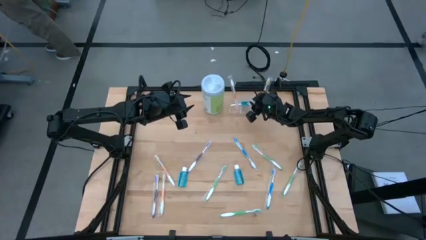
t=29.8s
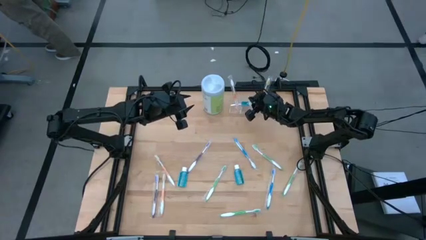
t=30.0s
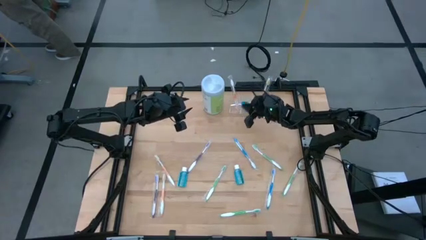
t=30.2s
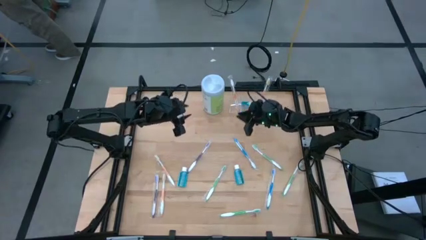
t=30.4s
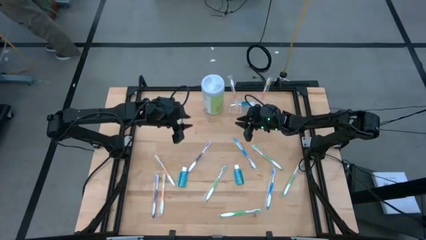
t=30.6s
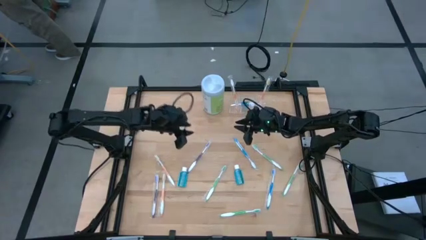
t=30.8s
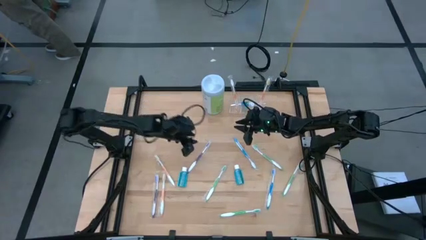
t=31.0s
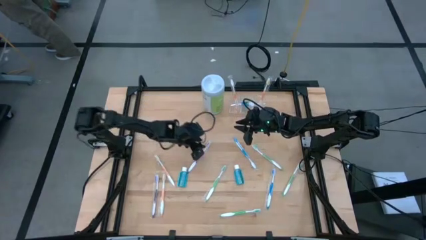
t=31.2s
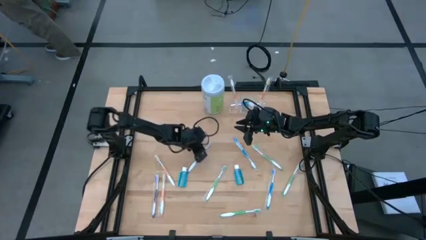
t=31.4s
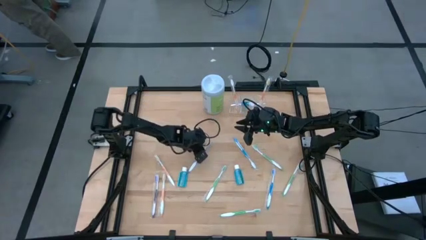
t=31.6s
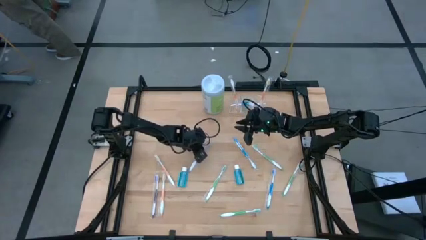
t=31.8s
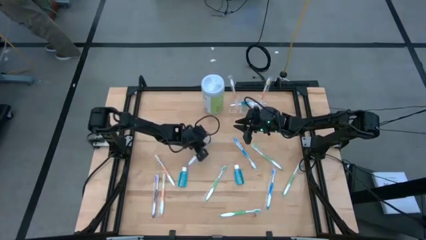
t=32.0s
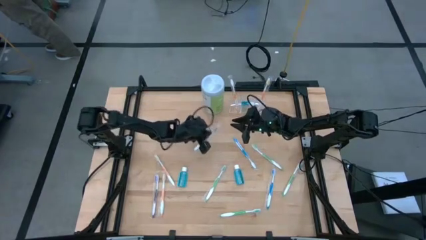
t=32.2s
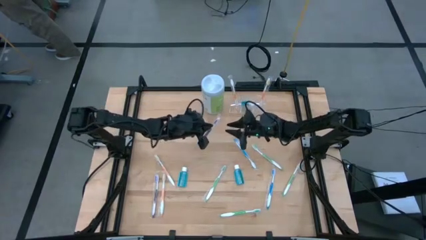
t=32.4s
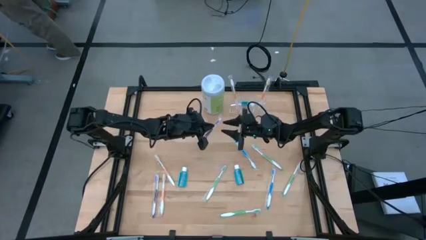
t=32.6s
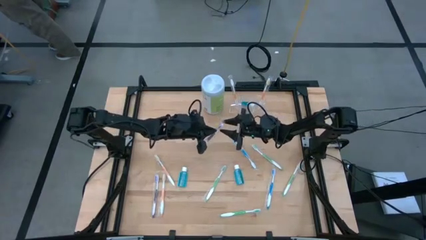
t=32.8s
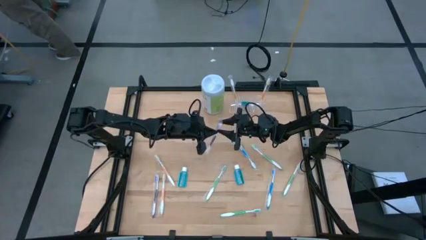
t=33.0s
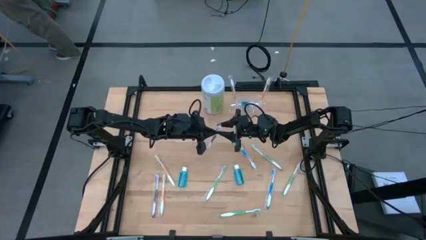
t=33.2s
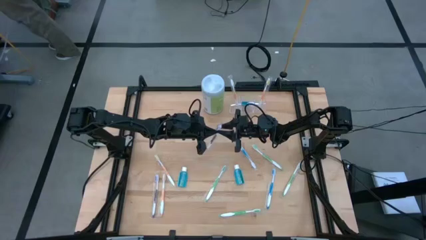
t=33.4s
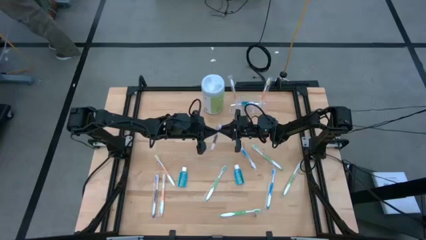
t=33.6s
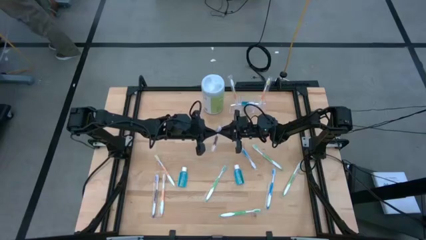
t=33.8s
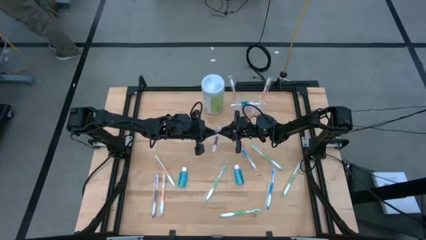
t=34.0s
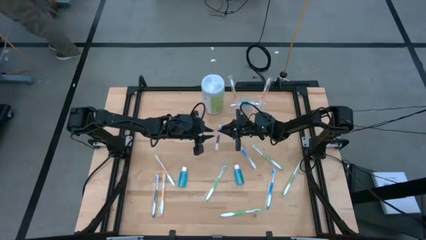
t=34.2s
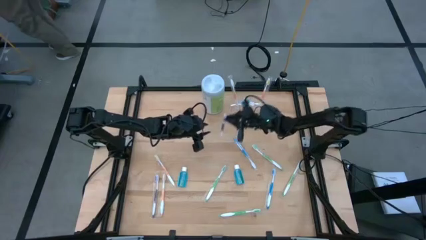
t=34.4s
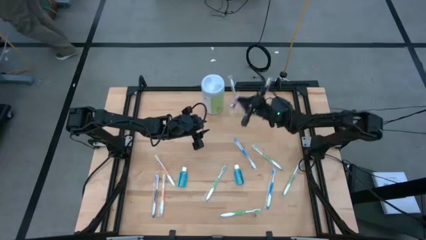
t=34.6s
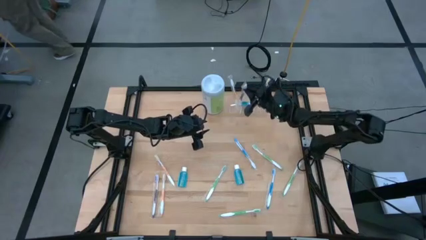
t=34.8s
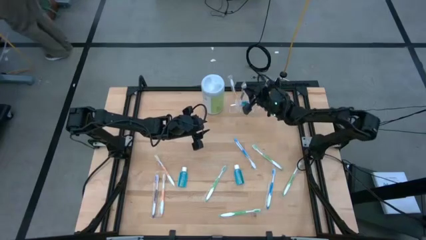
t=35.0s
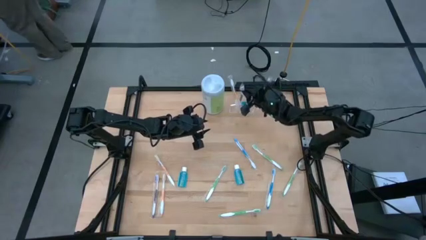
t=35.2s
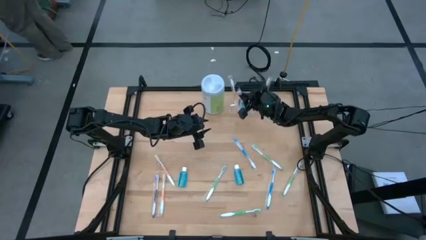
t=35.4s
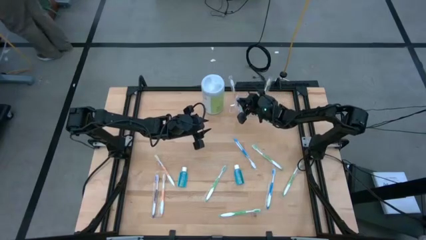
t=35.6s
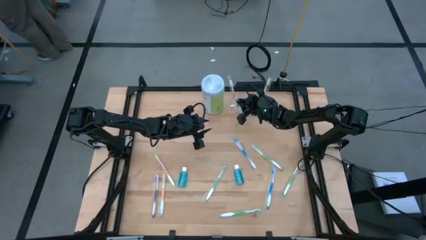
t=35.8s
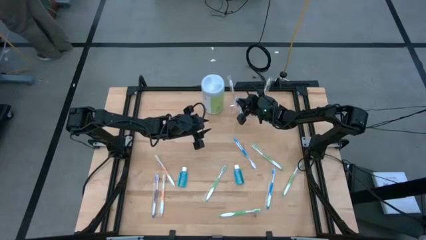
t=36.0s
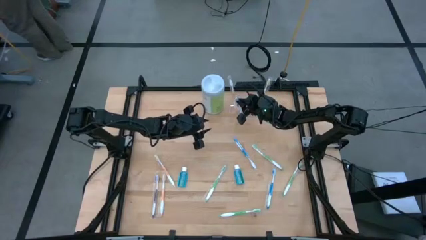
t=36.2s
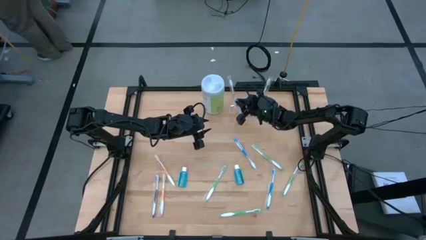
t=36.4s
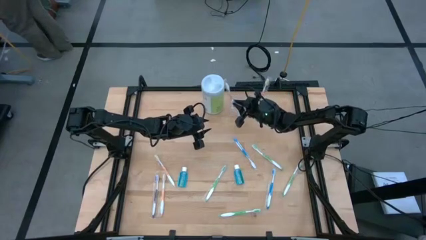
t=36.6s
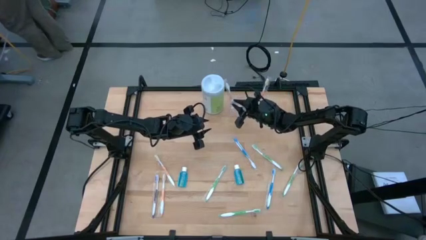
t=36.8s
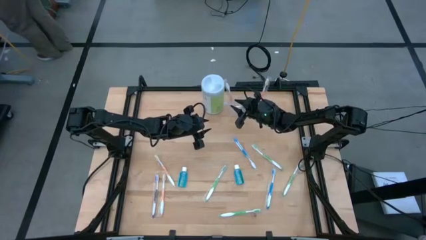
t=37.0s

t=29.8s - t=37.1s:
Task: Pick & Place toothbrushing station
Put the purple toothbrush into the transparent organizer

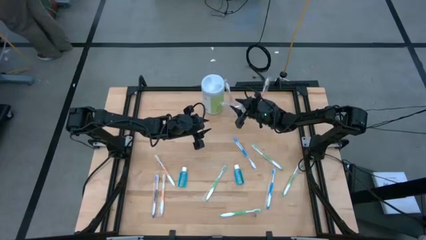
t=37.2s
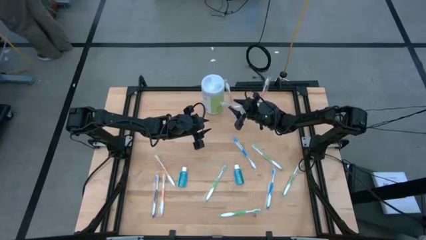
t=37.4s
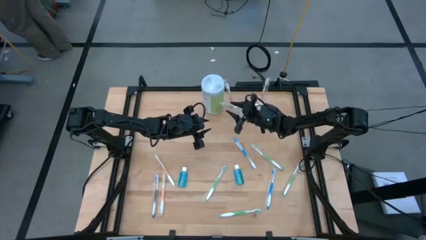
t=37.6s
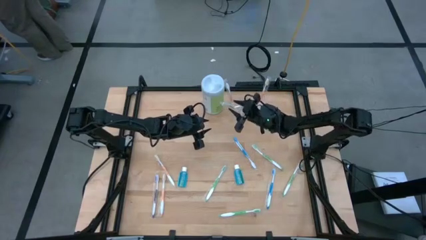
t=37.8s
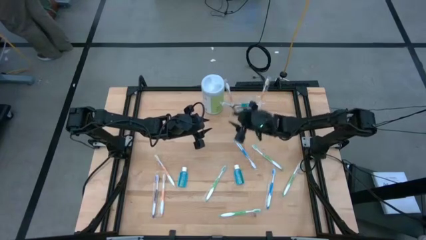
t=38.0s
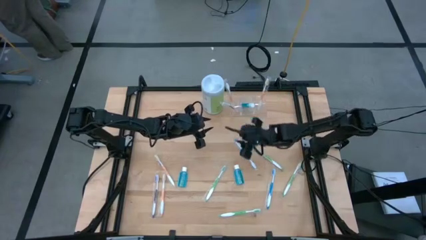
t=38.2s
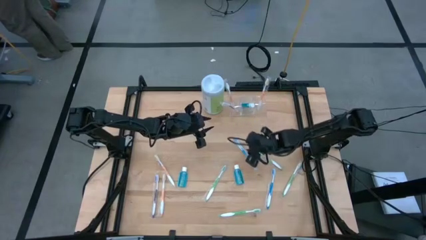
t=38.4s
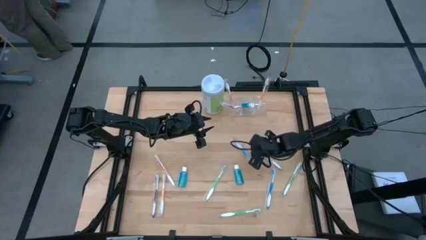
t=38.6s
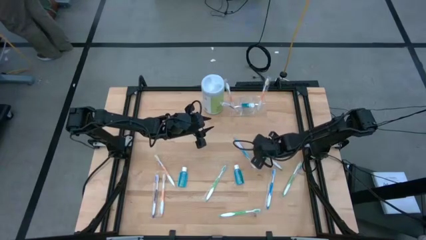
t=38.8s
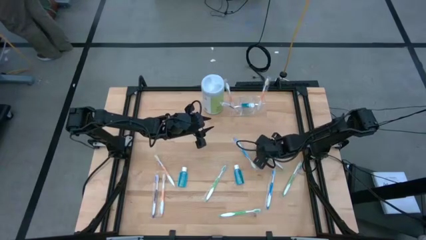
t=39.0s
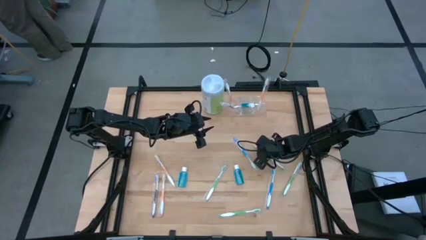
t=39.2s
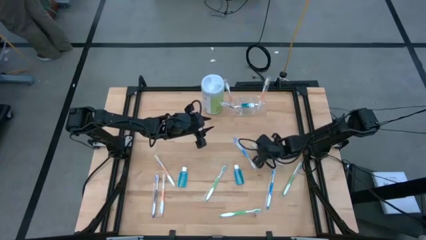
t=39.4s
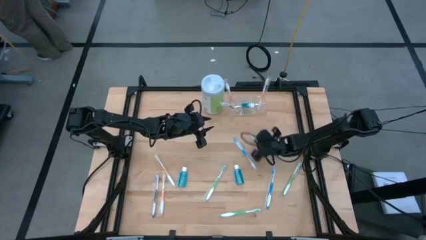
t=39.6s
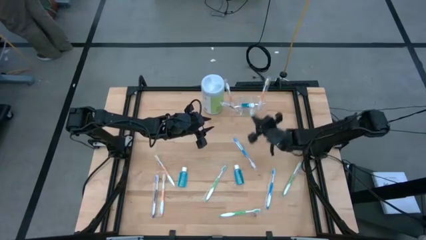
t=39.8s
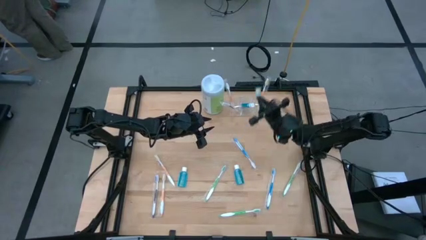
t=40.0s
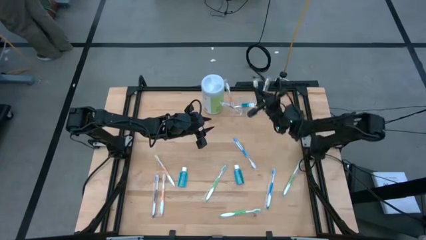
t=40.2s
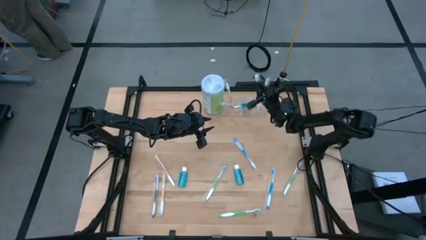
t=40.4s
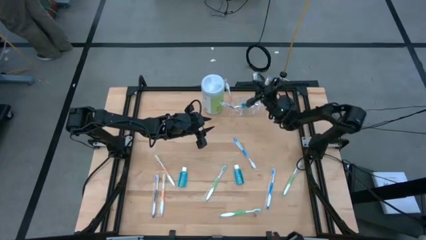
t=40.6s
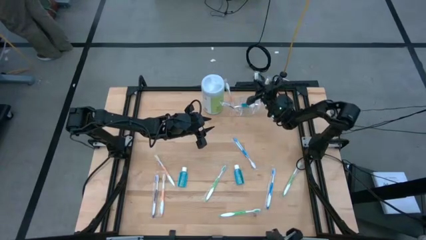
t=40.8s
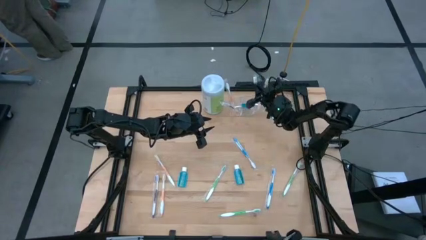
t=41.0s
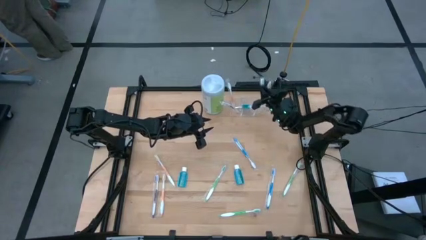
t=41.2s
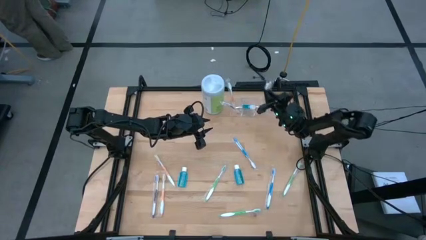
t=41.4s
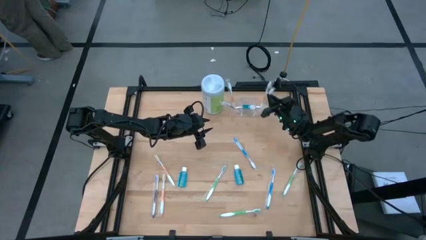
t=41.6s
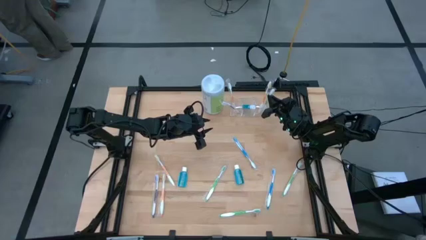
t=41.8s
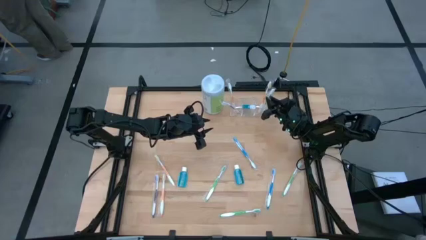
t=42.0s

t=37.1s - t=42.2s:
Put the green toothbrush into the transparent organizer

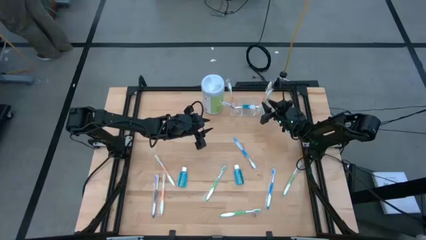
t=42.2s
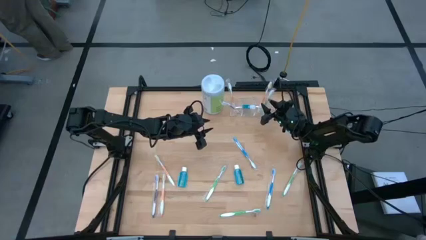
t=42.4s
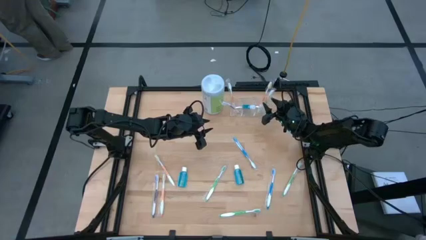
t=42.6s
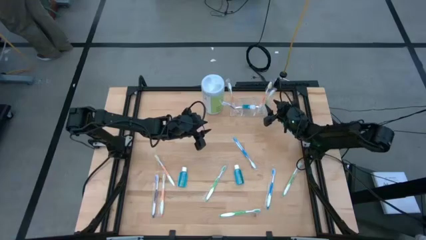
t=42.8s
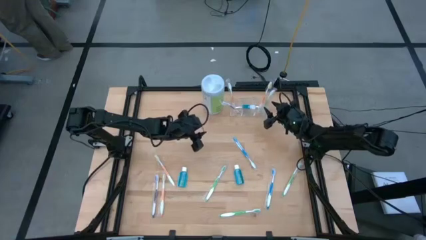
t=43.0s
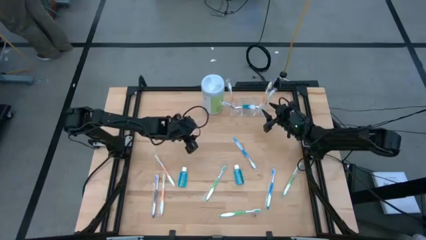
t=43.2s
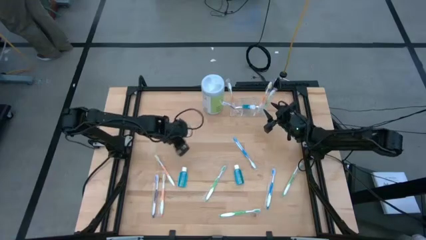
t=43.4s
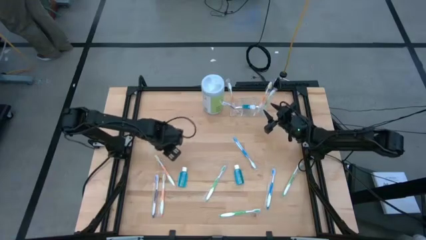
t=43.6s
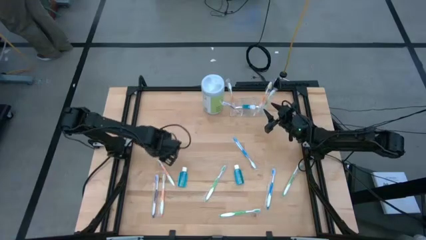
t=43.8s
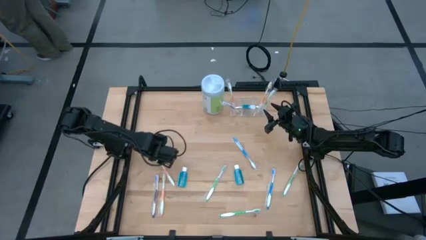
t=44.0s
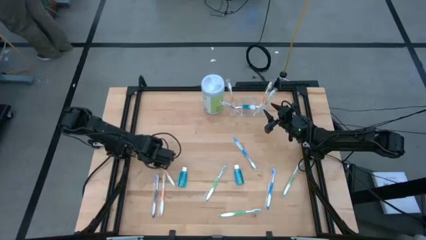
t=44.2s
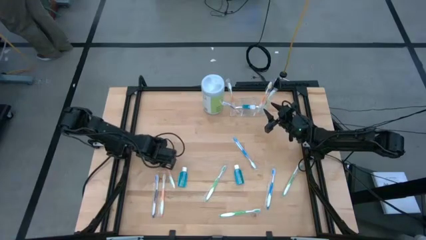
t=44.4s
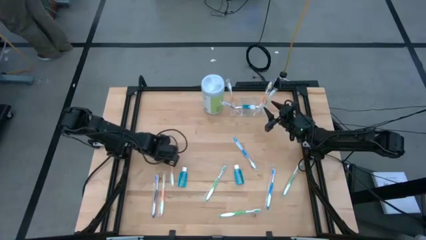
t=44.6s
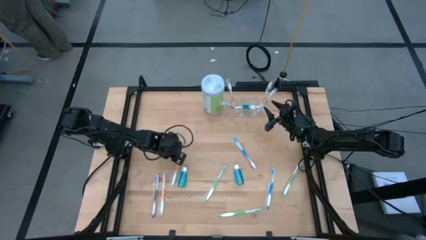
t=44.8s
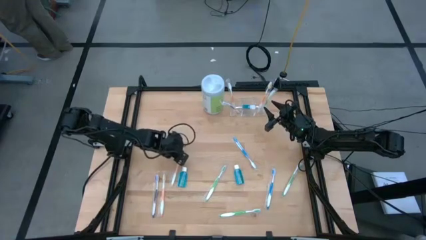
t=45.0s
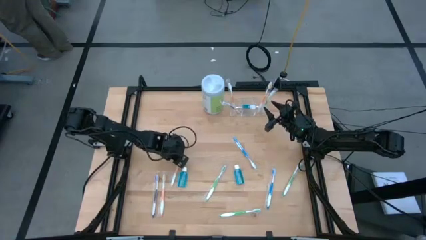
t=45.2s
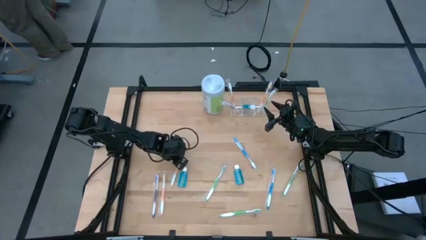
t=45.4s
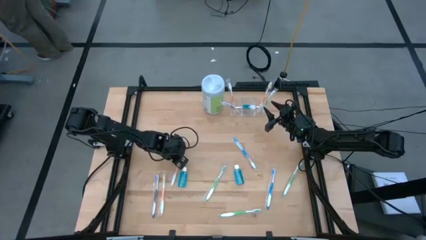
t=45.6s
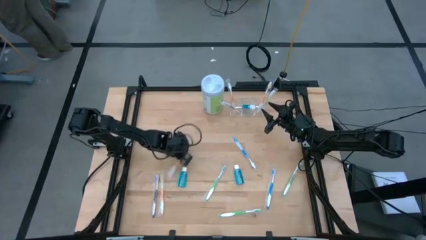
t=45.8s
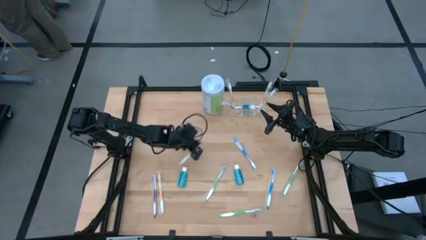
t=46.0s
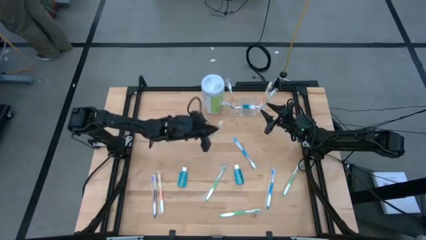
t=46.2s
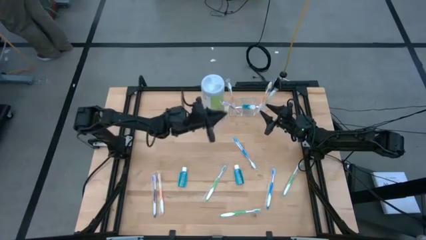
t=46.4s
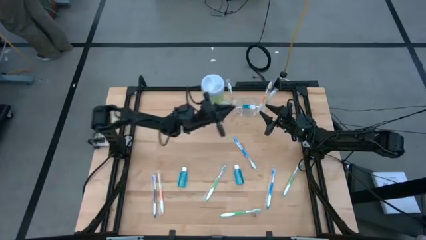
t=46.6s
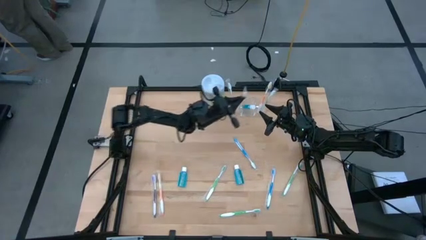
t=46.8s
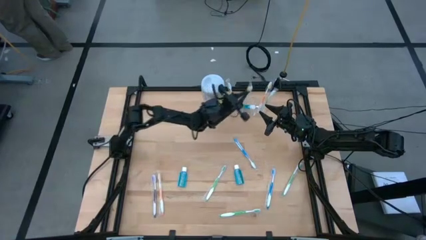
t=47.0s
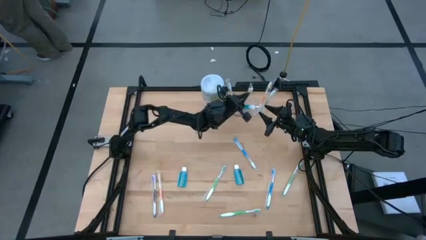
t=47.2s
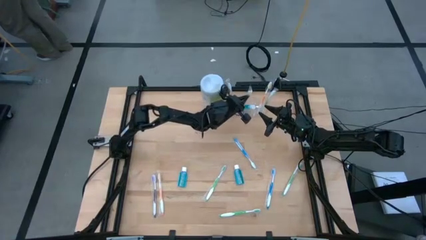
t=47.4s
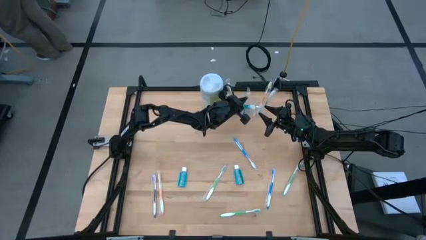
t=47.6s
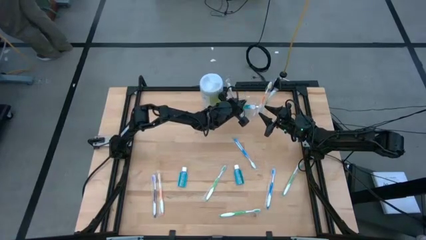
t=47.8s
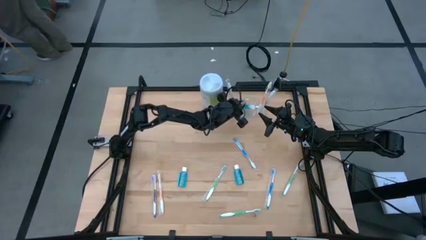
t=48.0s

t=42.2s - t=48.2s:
Put the orange toothbrush into the transparent organizer
